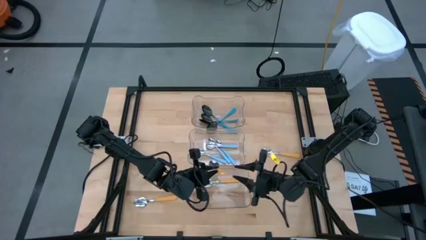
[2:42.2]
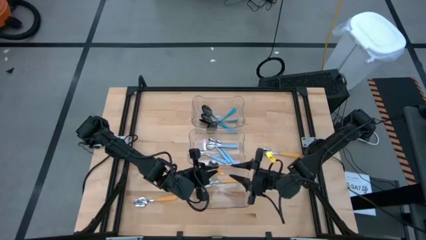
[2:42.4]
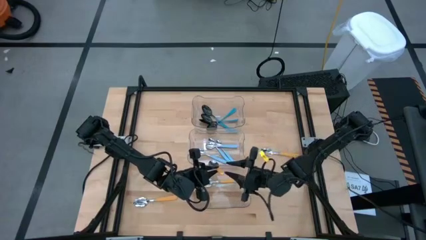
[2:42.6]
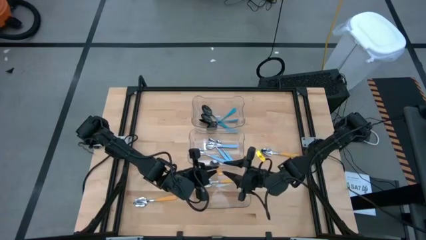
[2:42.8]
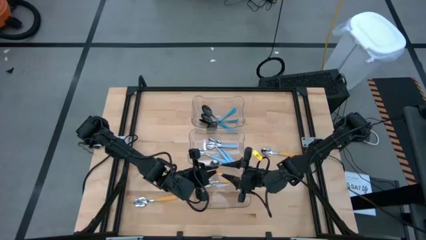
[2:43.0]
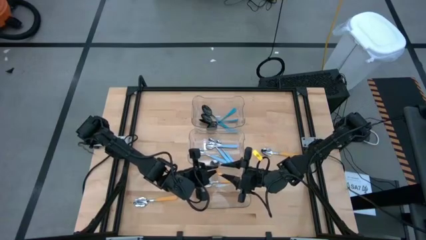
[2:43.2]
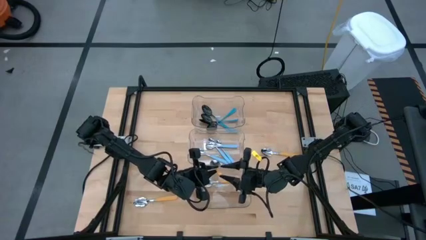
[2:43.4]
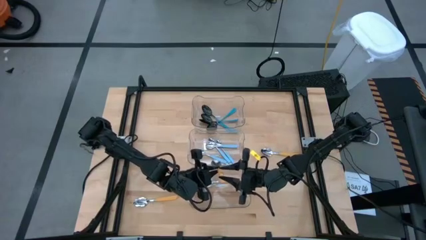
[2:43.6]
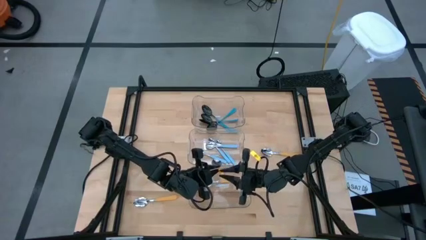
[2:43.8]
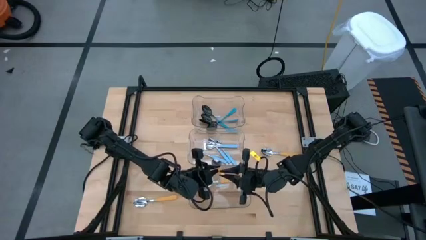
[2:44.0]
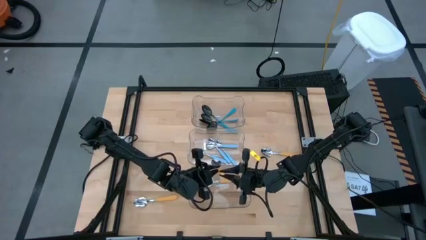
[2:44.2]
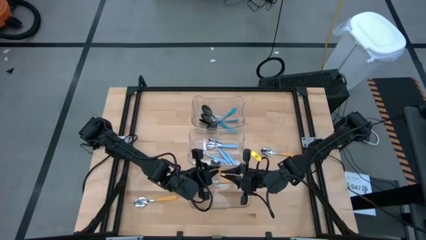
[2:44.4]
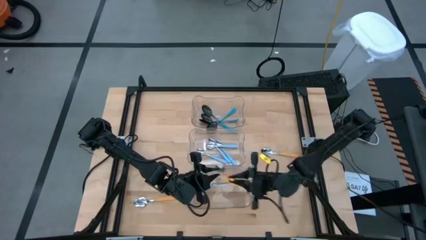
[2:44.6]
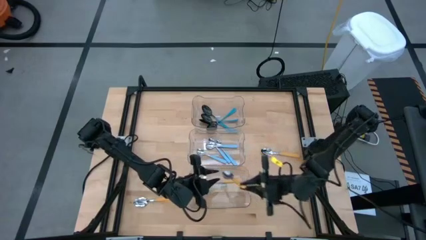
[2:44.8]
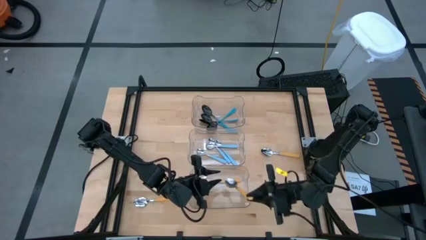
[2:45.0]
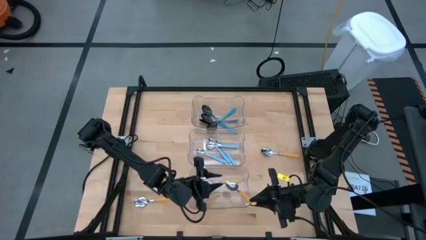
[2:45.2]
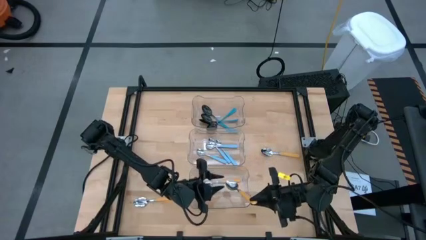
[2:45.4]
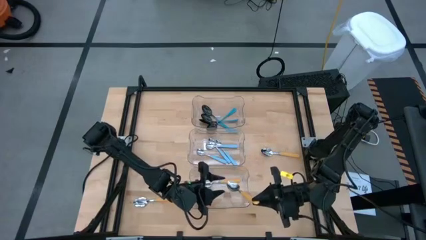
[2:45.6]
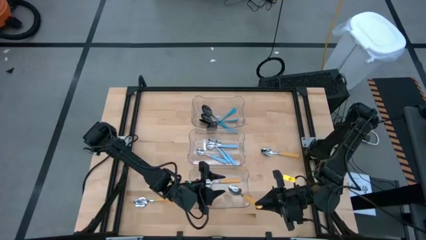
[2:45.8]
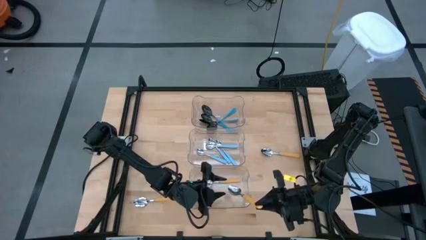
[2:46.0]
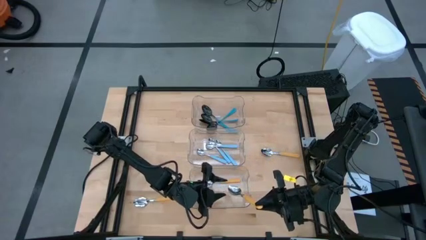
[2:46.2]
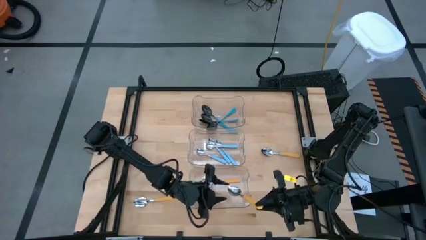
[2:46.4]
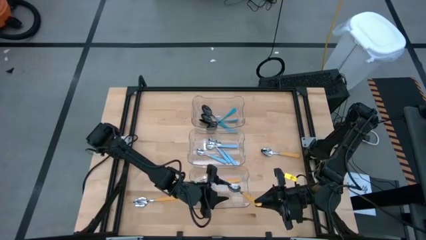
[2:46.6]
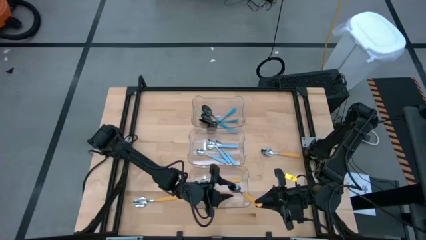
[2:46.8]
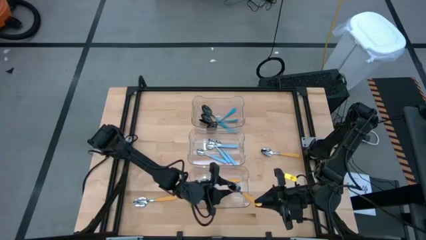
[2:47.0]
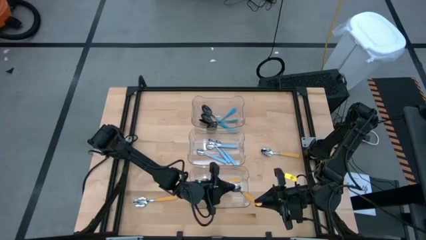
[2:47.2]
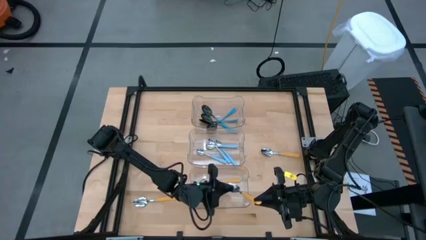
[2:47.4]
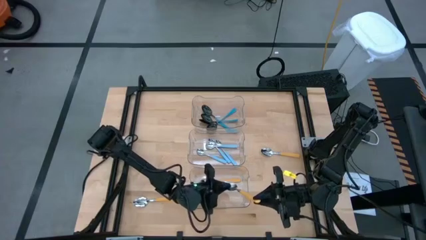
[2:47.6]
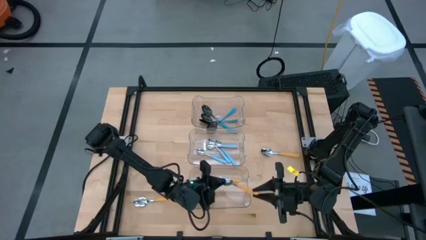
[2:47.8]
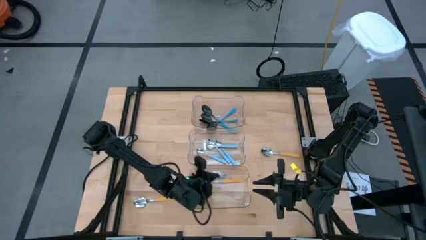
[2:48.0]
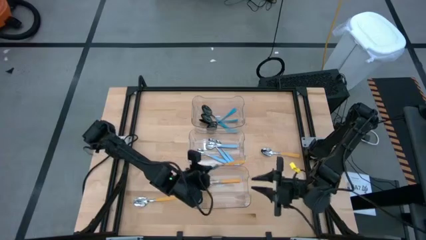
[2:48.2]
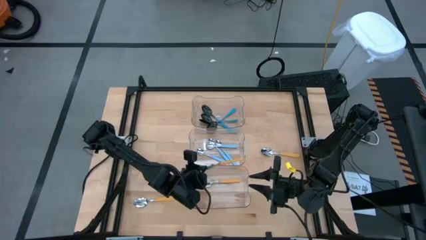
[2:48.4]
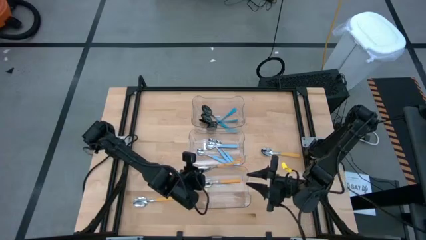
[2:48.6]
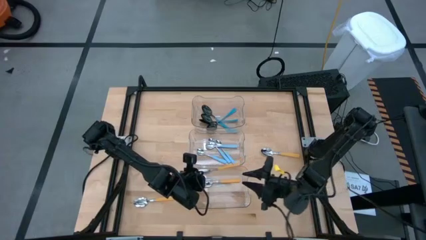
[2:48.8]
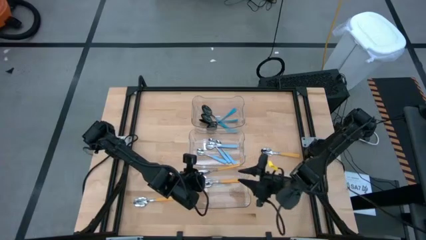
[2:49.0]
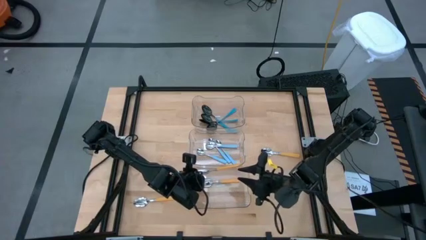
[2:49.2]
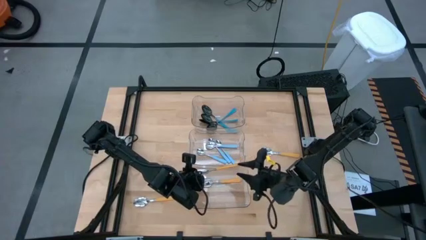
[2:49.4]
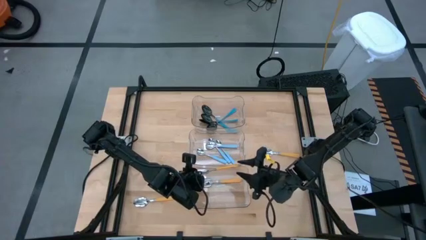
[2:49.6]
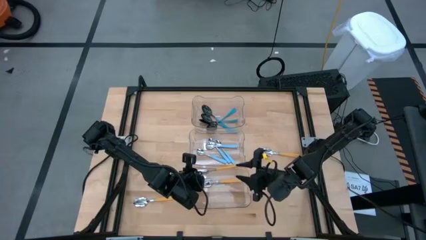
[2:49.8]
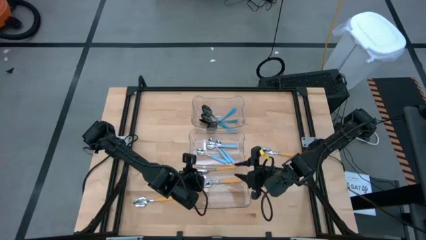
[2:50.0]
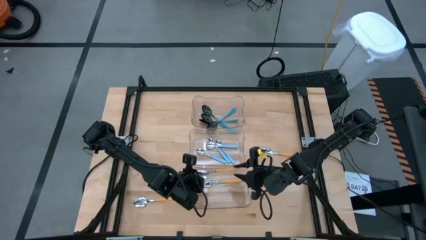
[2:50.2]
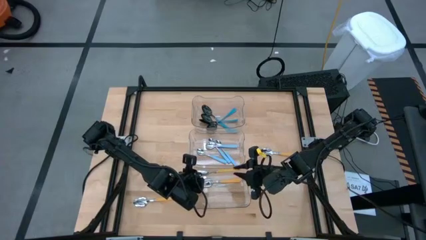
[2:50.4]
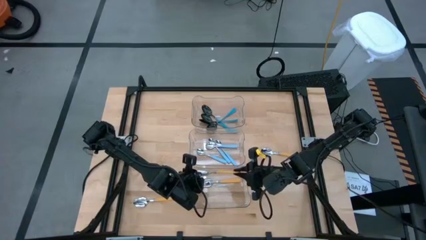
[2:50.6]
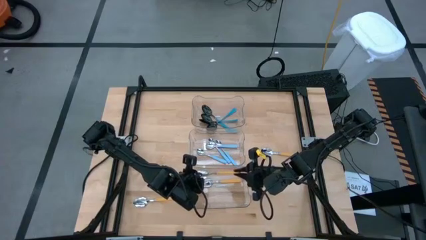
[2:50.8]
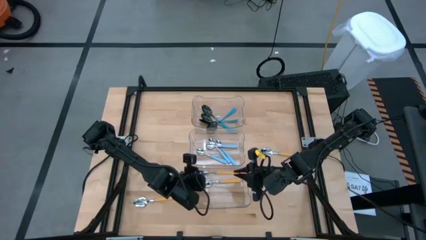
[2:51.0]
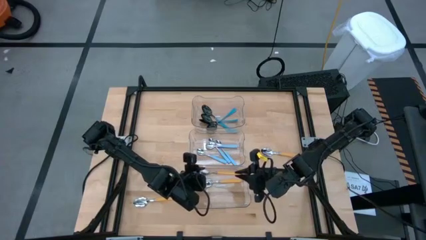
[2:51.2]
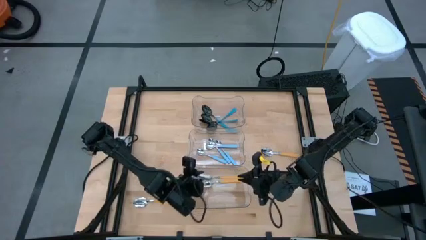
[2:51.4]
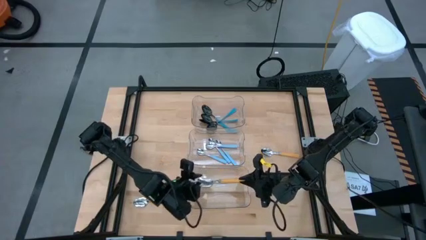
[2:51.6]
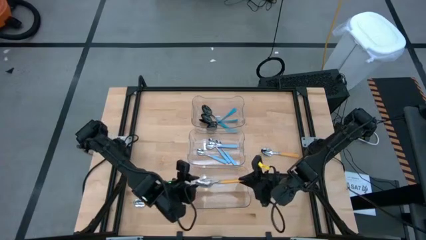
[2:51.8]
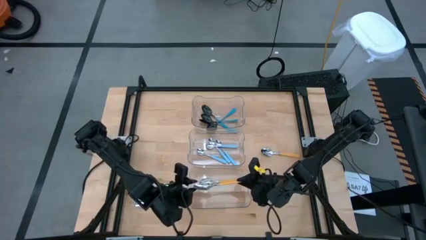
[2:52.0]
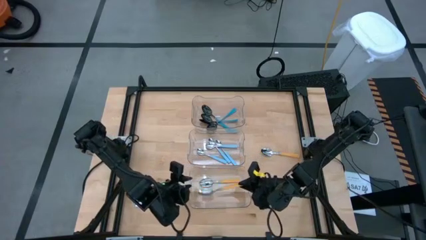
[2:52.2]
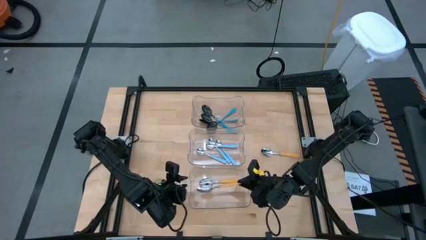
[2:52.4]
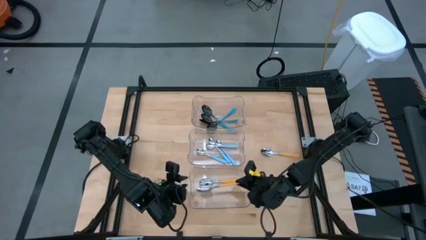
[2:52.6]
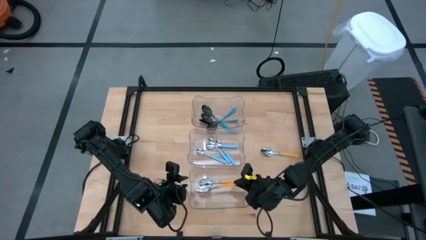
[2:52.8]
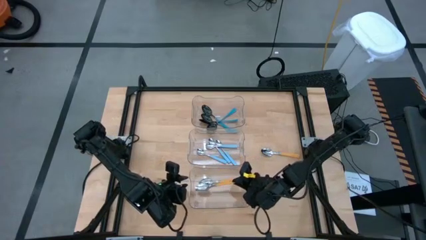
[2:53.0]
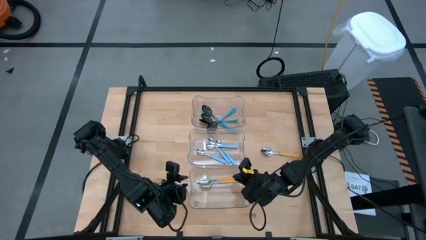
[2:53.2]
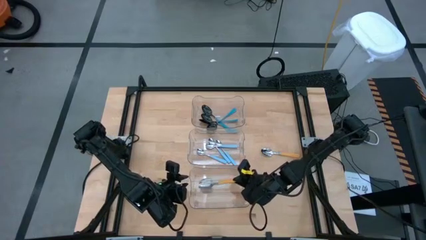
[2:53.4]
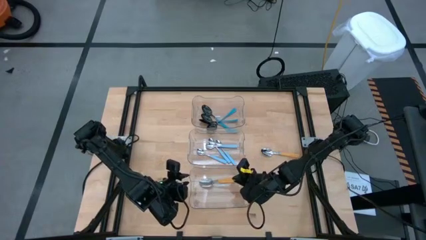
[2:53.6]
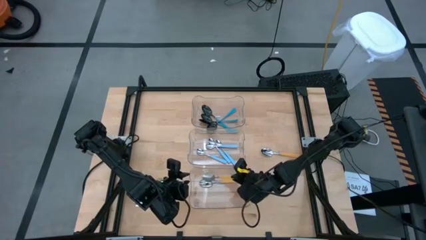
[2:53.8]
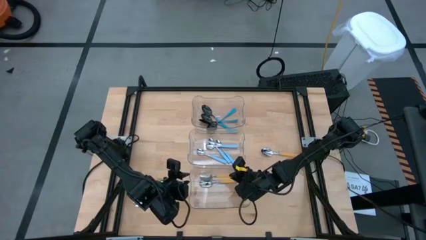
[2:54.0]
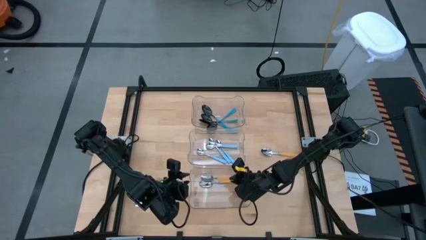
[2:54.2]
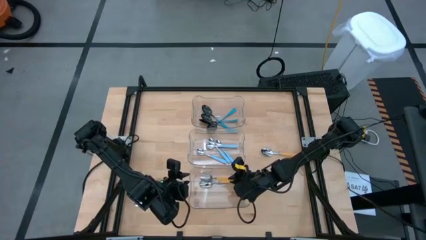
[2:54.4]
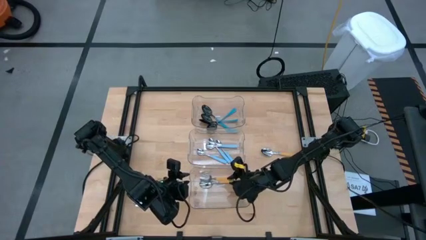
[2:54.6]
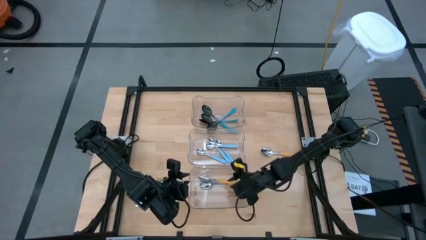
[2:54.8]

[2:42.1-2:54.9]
Task: Sort silverware by color (type)
Put the yellow spoon into the bottom transparent bin

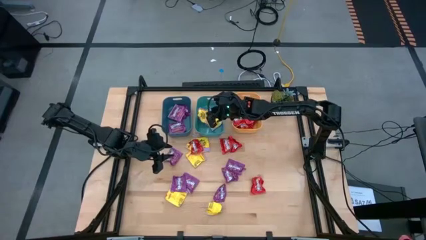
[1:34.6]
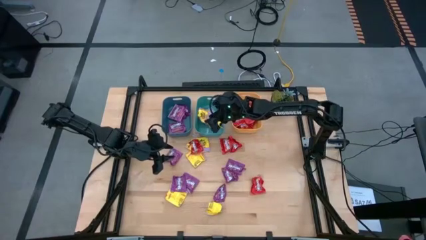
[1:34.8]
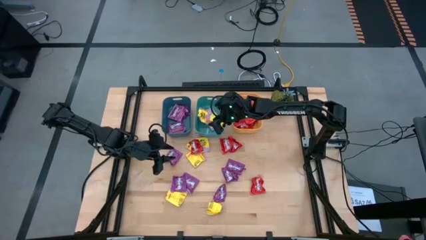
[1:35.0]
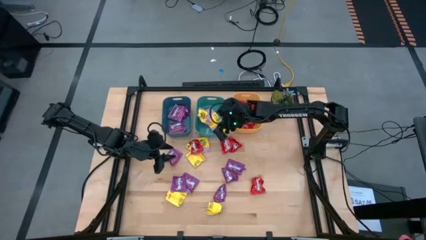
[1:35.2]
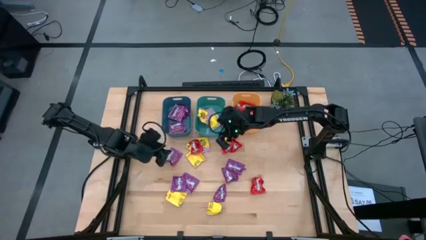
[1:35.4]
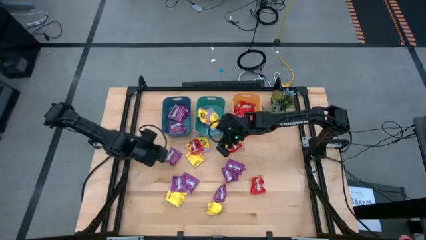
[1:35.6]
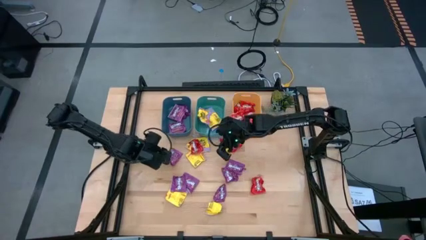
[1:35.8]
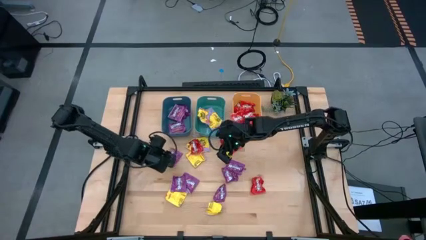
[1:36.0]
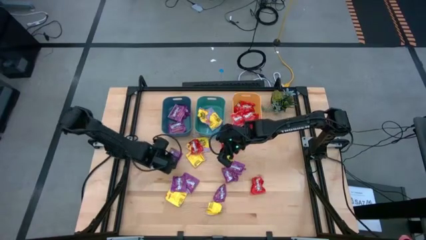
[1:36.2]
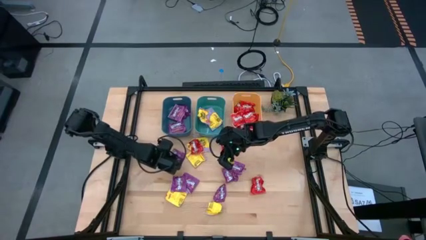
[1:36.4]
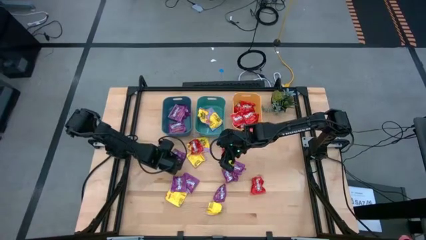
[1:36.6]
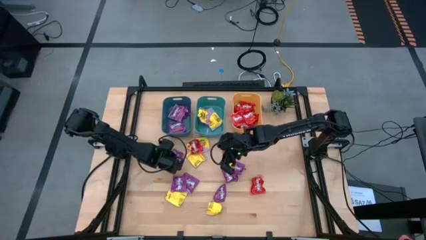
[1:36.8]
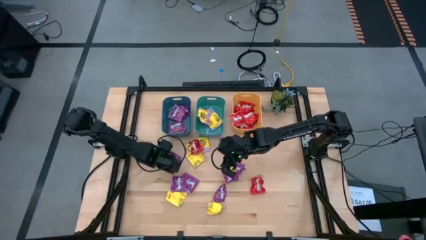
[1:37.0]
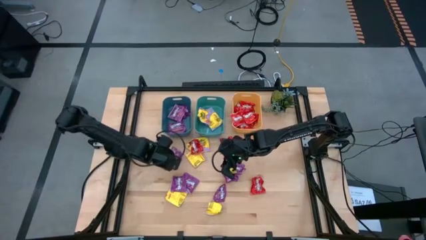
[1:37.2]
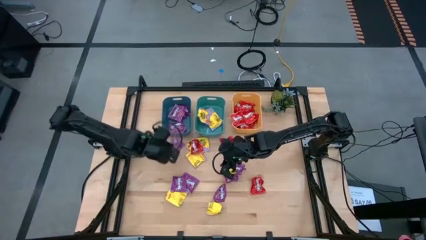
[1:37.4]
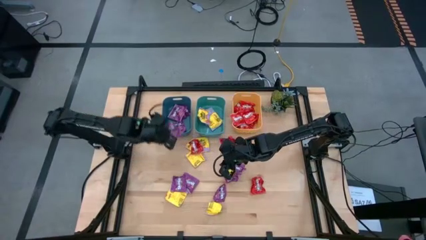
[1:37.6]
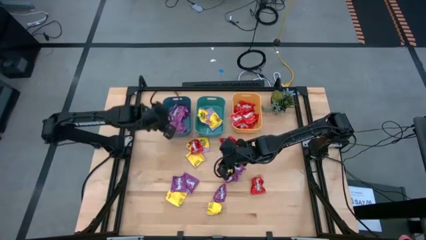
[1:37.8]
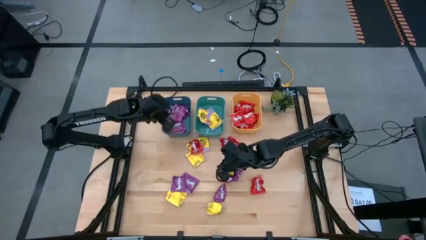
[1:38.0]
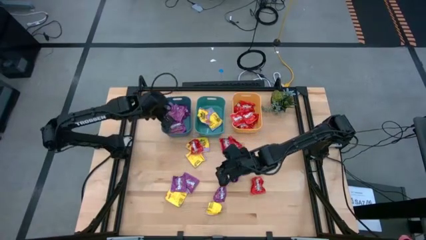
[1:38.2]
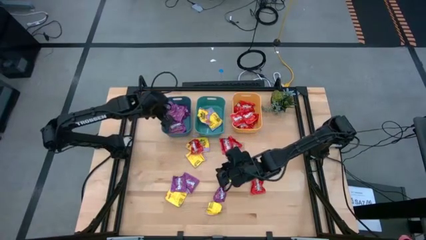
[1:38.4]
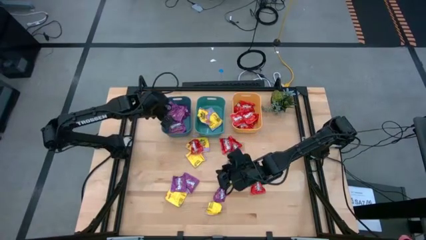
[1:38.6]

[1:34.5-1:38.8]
Task: Sort candy
Put the violet candy into the blue bin
